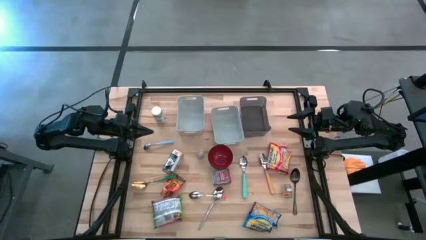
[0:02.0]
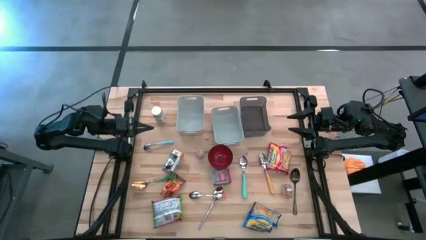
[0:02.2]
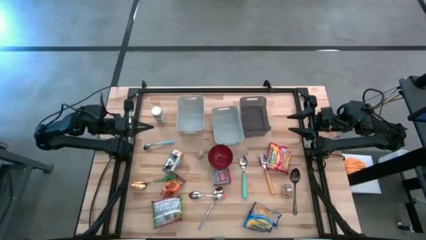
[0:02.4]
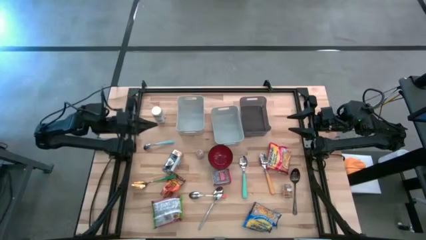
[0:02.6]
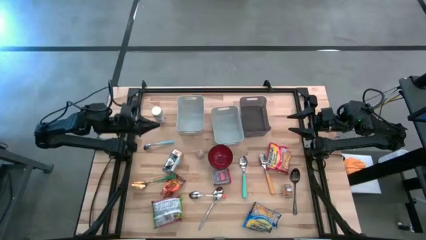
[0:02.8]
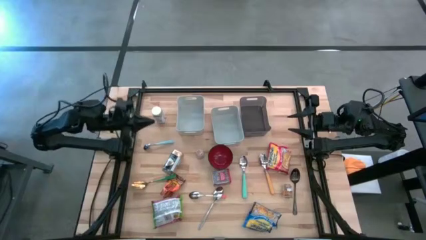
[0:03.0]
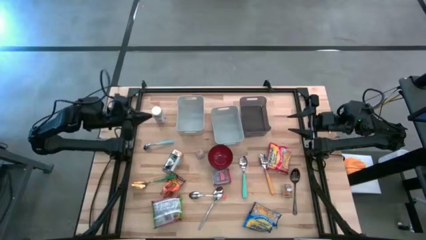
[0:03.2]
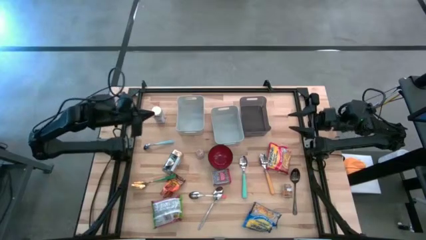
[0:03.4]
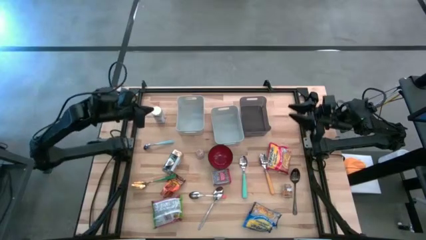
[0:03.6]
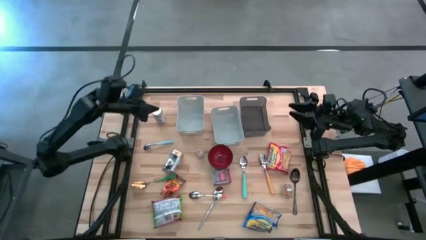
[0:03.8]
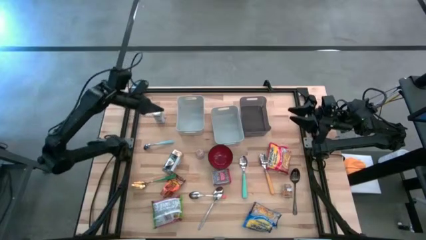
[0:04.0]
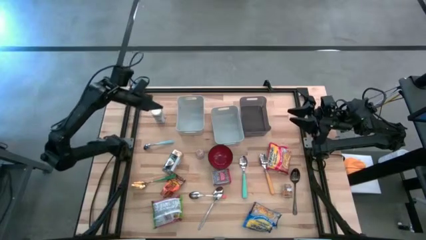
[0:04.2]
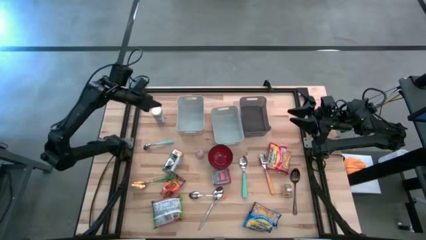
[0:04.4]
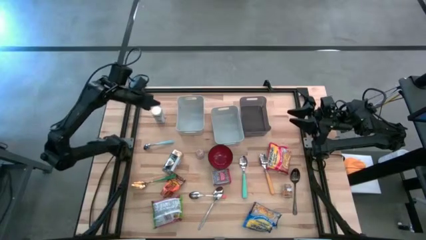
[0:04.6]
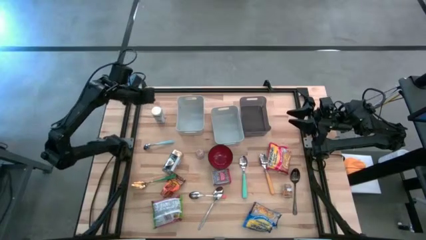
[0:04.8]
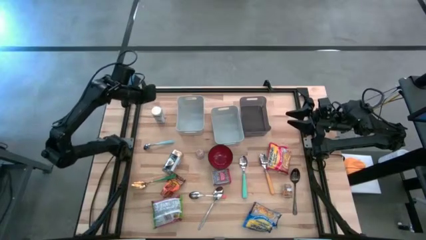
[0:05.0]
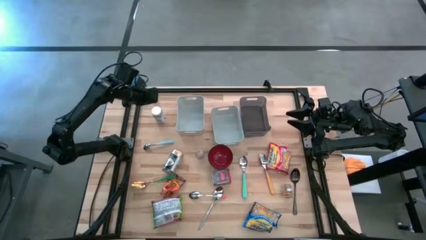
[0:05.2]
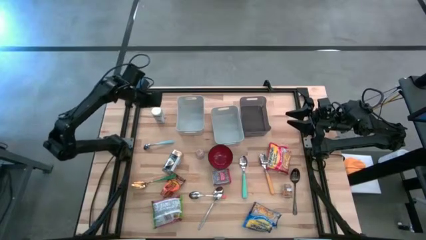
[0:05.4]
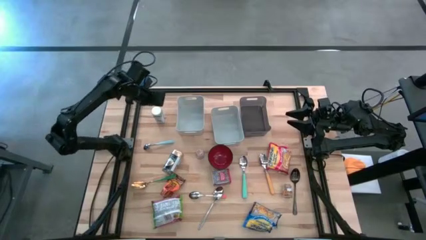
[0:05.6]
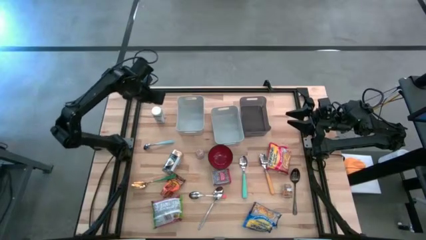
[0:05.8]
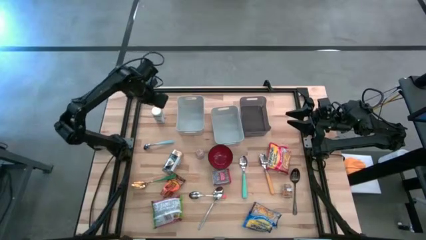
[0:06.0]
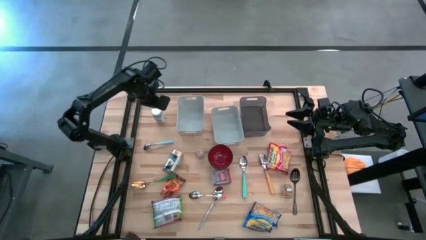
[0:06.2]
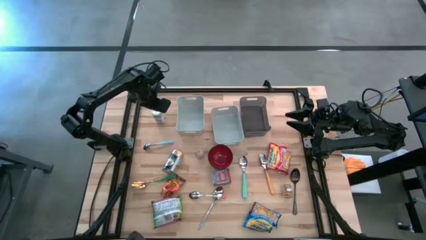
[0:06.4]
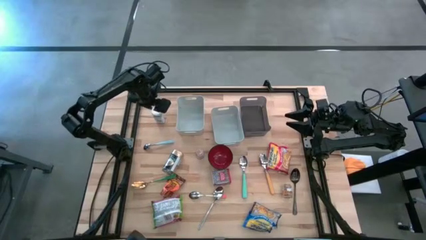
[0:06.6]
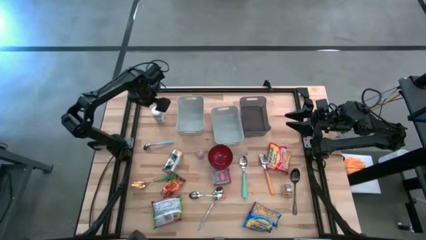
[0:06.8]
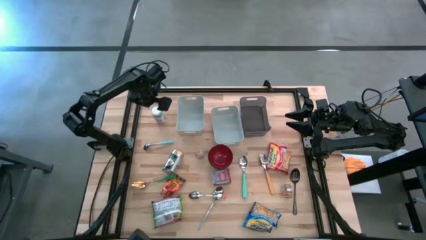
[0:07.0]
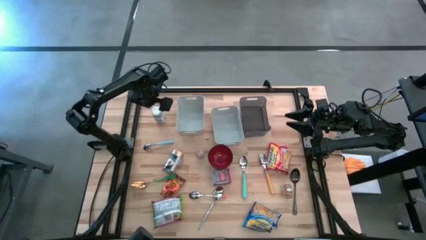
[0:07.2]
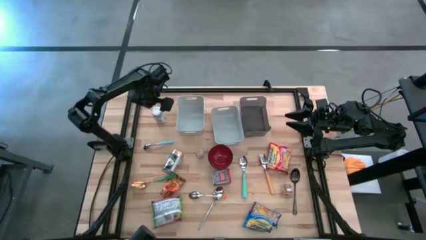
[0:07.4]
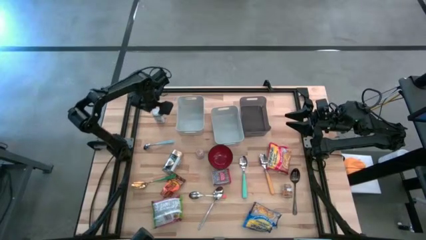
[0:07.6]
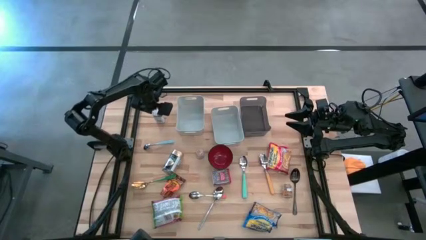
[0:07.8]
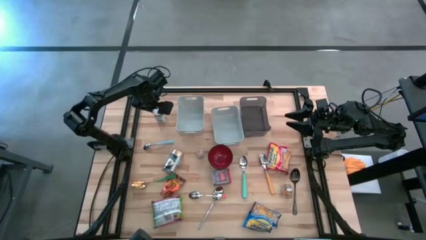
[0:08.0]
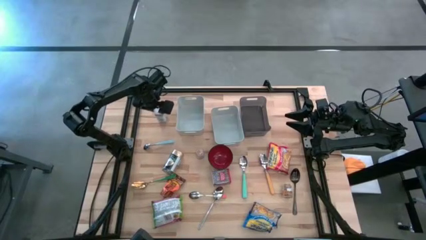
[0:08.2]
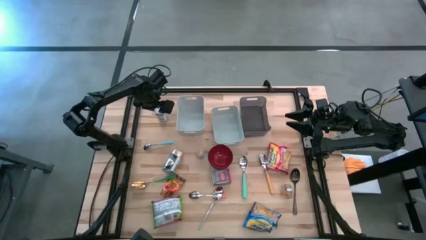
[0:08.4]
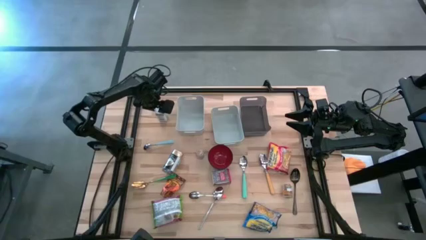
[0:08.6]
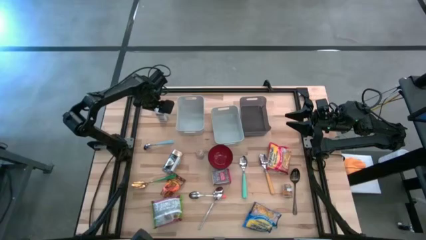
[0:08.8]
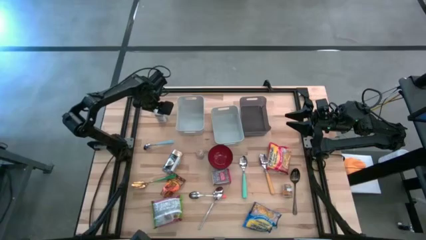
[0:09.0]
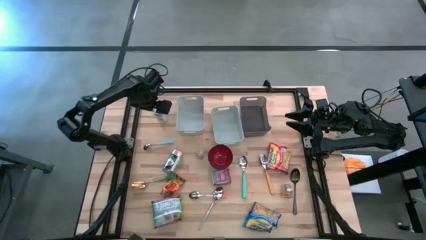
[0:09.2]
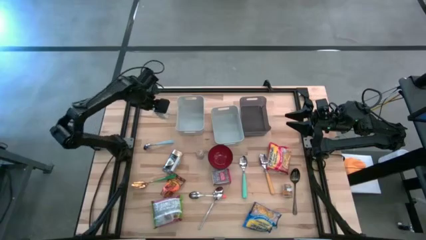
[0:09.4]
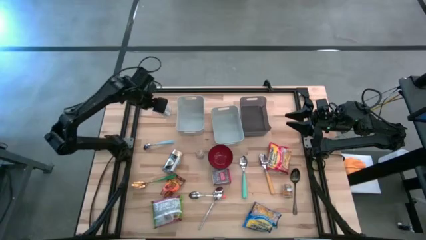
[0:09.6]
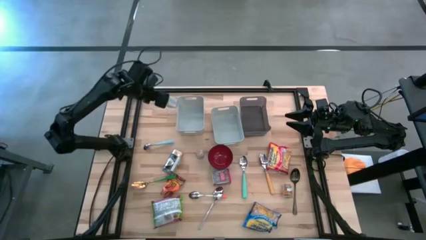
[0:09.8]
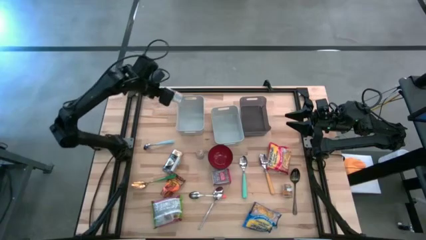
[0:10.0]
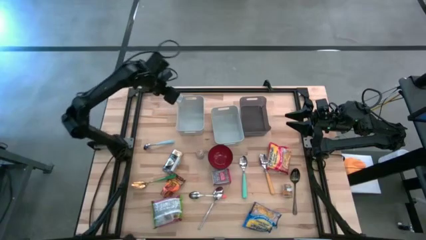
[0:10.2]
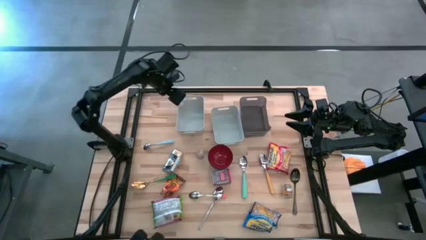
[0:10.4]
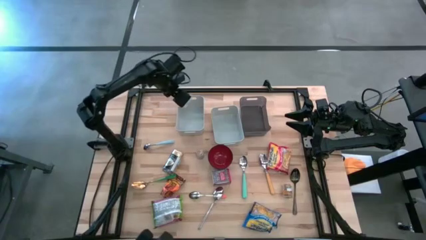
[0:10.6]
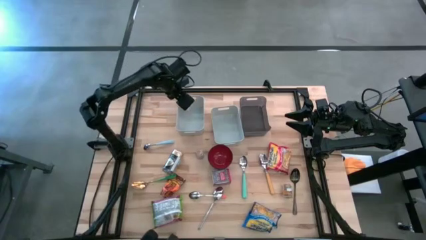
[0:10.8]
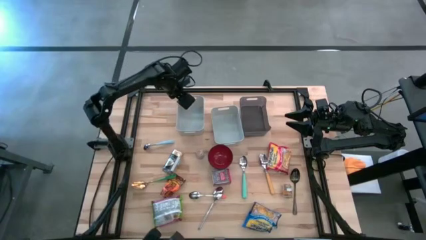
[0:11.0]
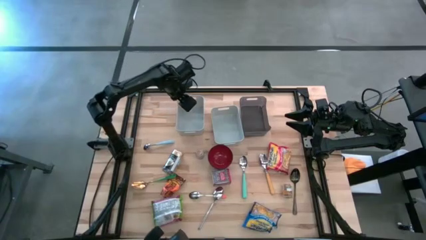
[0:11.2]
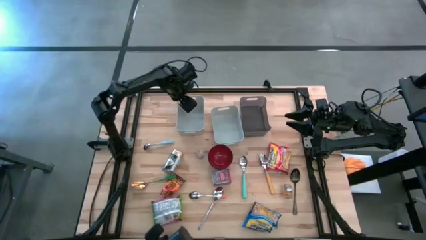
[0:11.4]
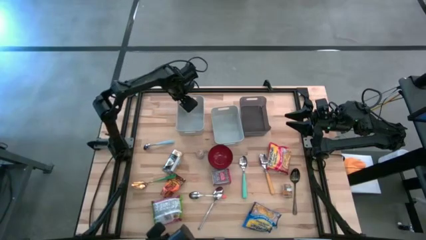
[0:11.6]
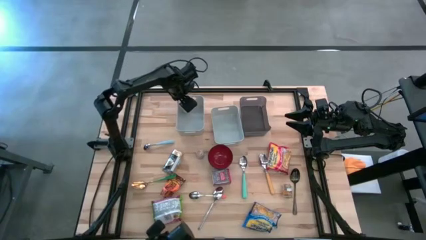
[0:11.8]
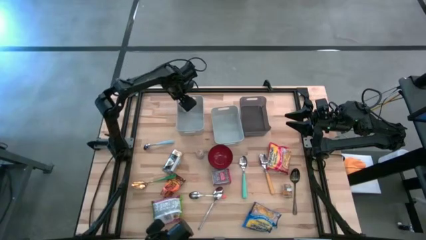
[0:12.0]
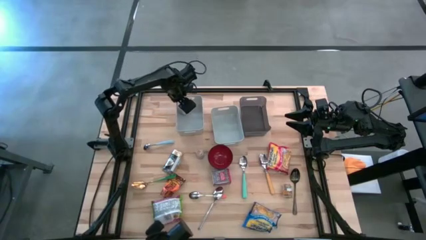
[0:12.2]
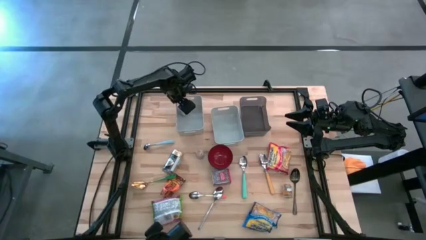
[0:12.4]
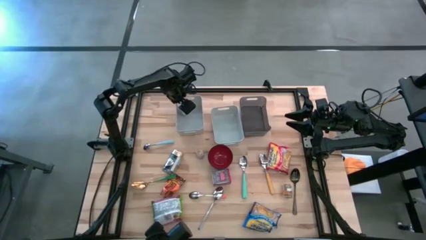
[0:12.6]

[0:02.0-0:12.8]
Put the white seasoning bottle into the left white bin

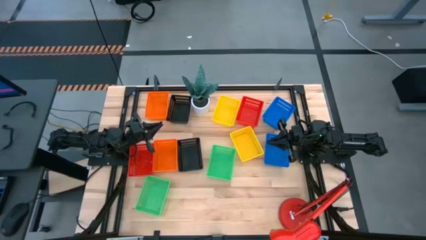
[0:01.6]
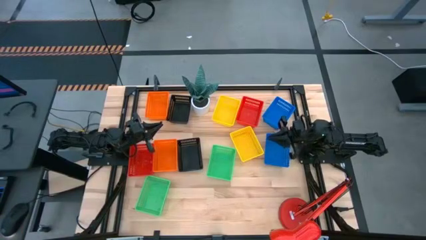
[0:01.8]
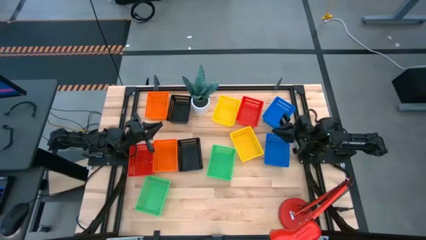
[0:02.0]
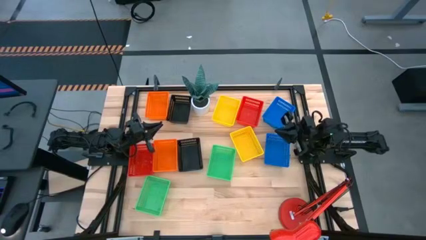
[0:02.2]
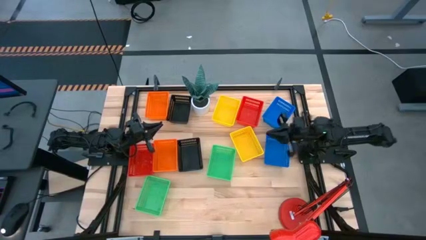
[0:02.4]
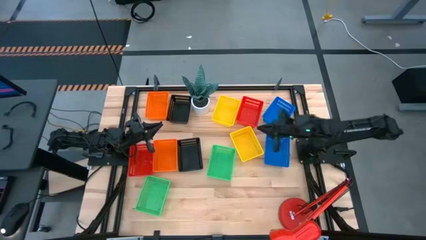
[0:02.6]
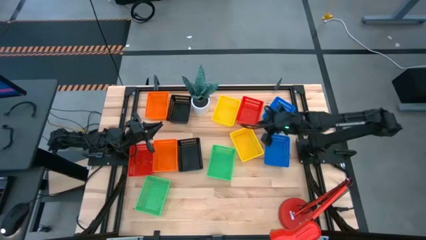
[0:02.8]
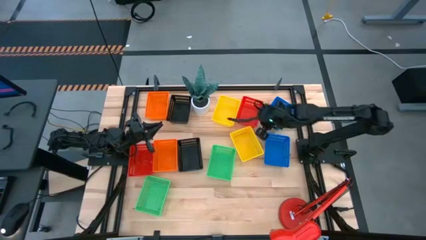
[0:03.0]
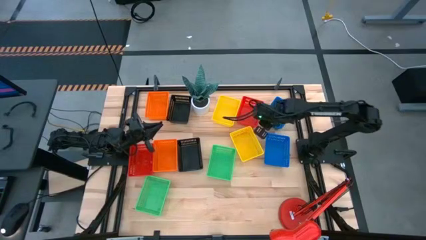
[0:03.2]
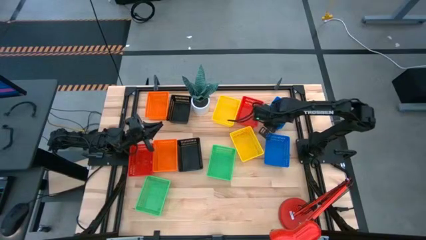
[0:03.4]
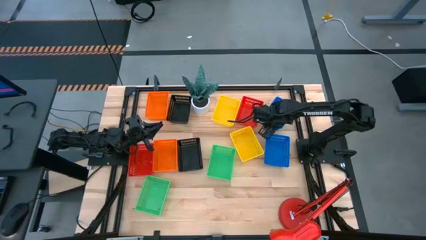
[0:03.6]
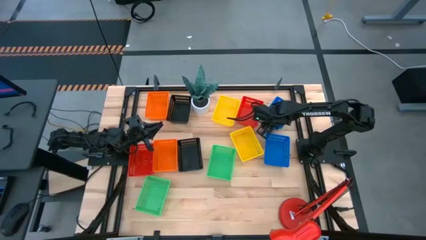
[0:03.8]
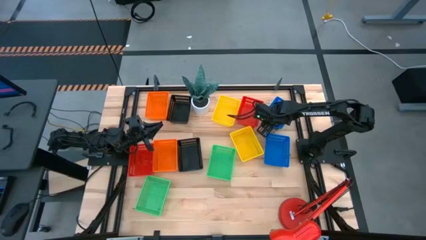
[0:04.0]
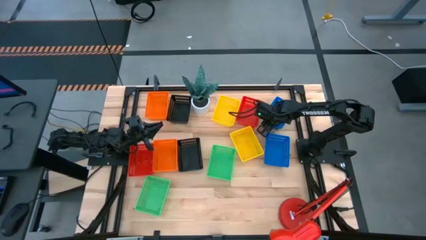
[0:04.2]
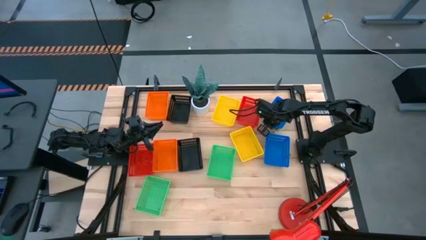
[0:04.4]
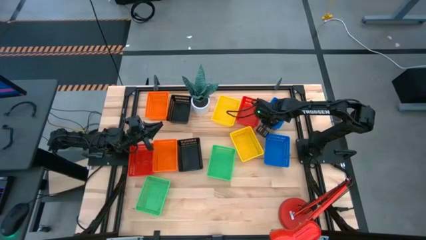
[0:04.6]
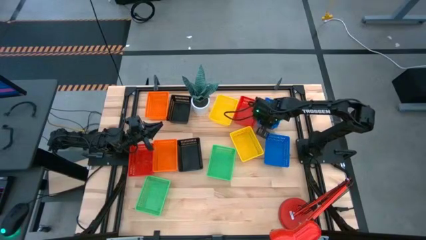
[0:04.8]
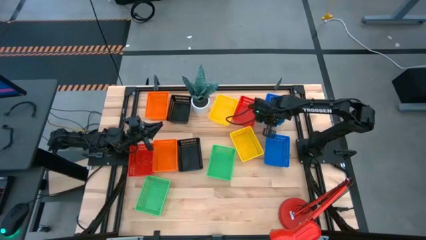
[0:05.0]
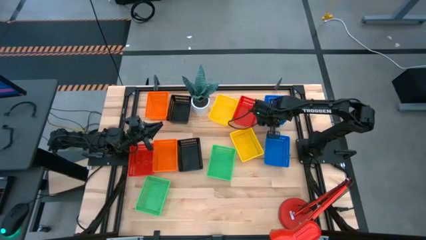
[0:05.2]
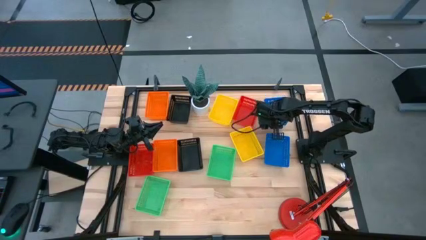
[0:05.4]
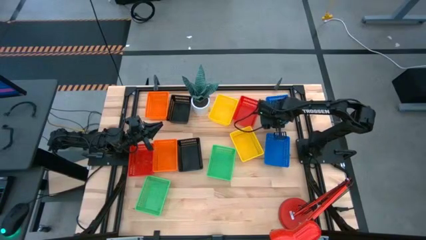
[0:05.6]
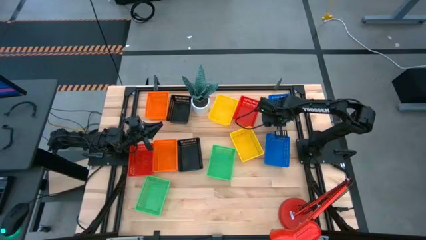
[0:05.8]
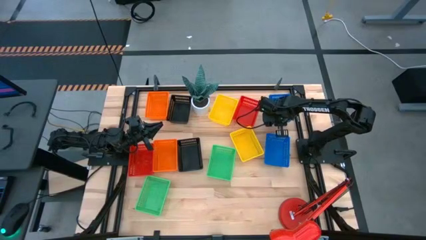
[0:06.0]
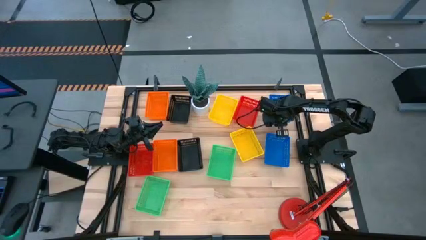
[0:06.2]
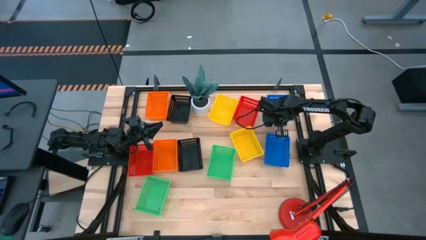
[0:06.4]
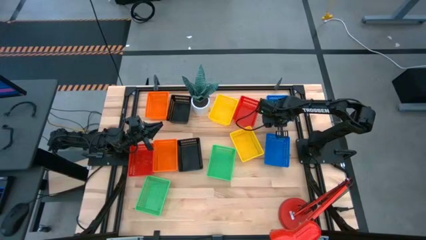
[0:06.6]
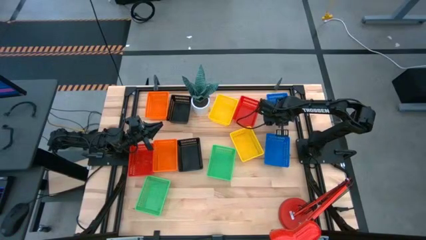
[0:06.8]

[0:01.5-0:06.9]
Adjust the top blue bin
